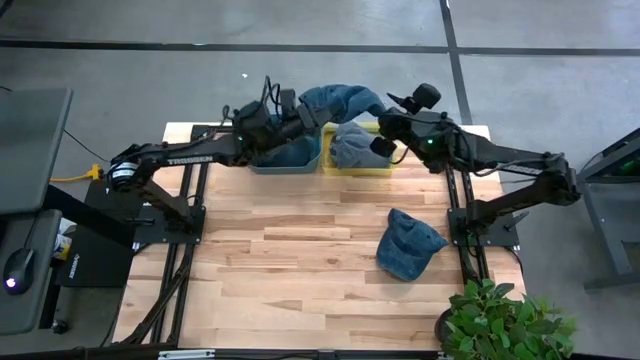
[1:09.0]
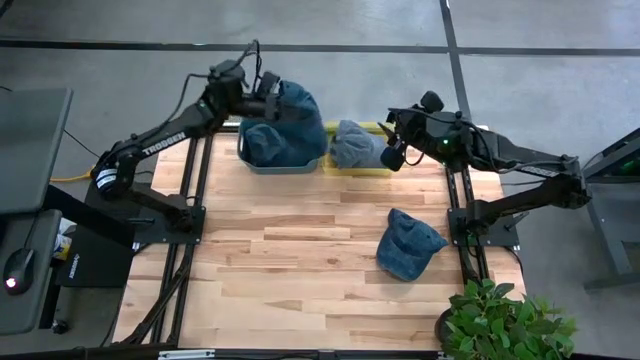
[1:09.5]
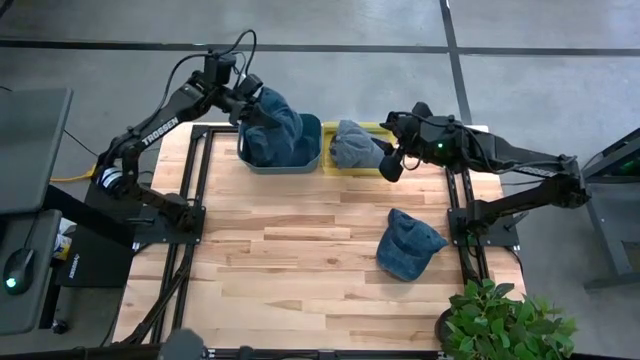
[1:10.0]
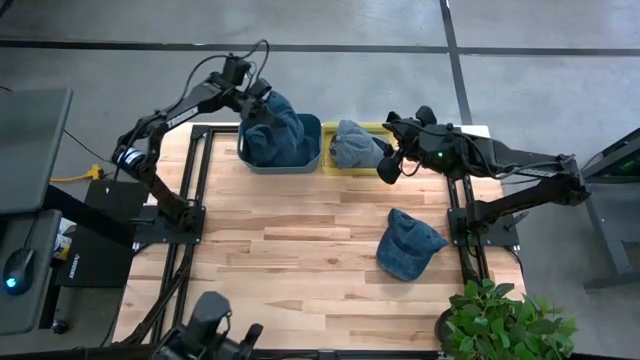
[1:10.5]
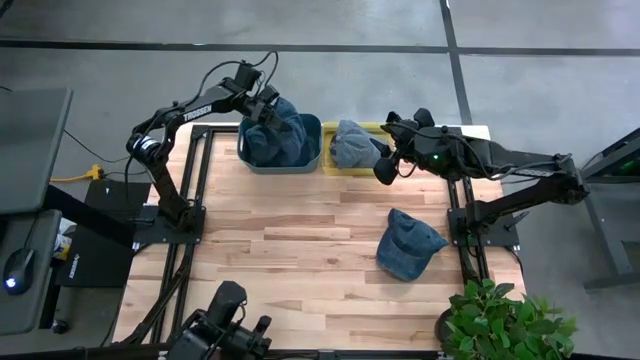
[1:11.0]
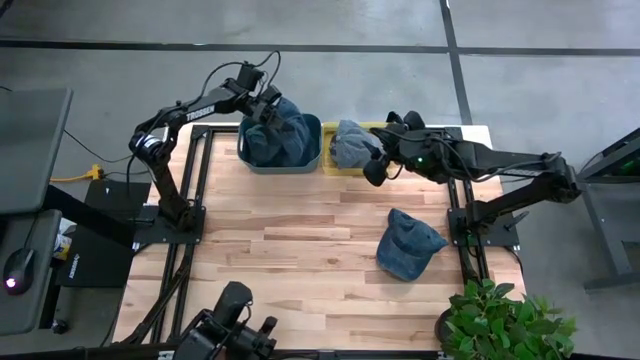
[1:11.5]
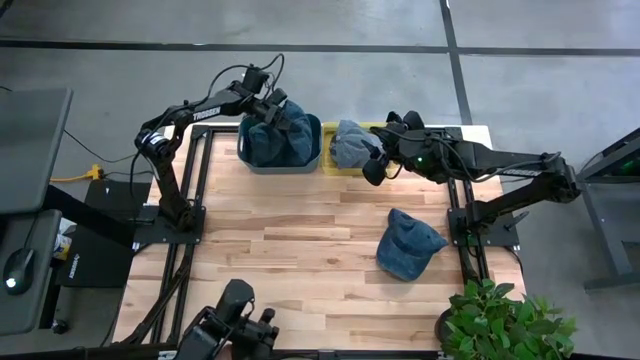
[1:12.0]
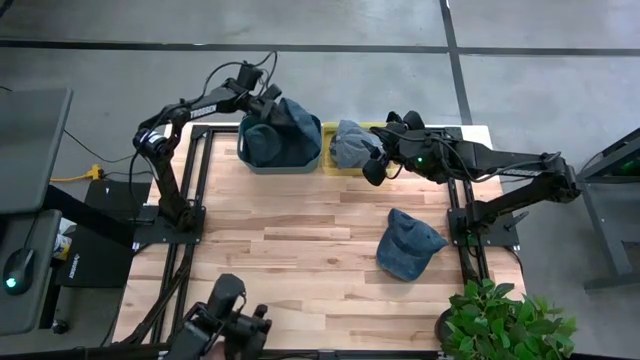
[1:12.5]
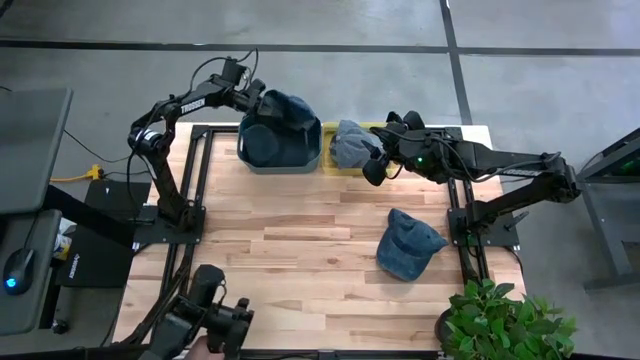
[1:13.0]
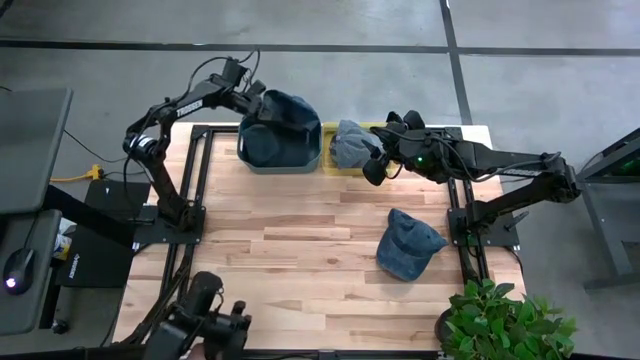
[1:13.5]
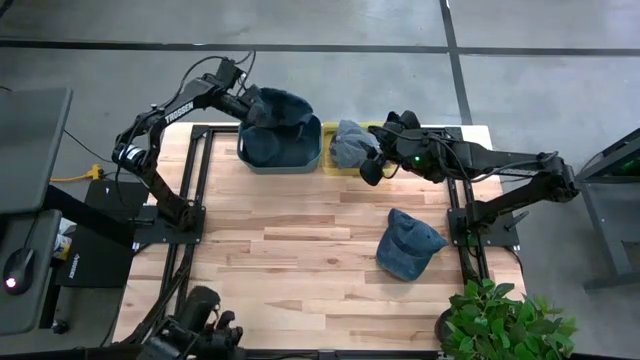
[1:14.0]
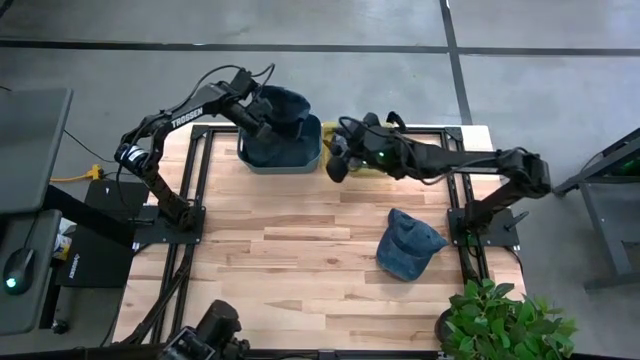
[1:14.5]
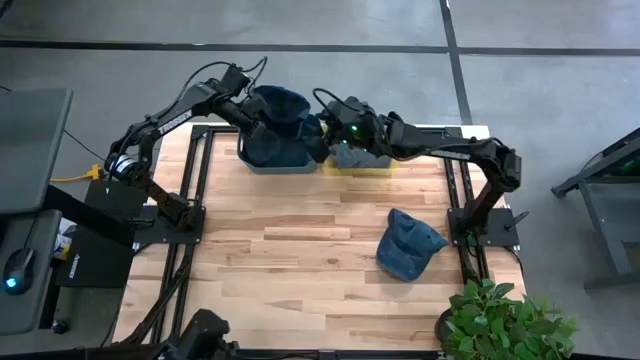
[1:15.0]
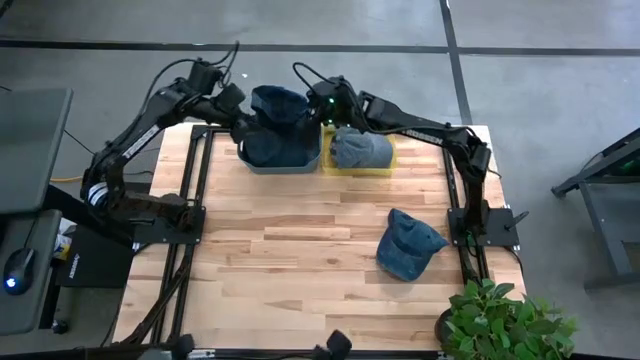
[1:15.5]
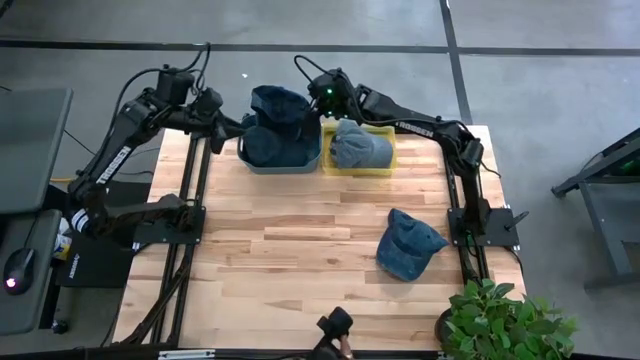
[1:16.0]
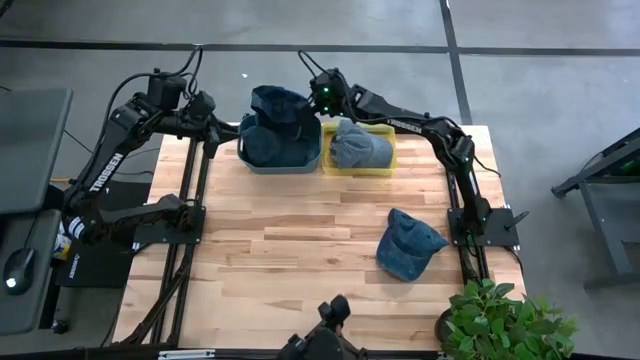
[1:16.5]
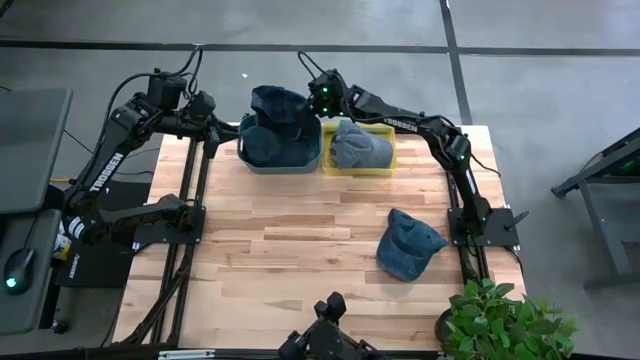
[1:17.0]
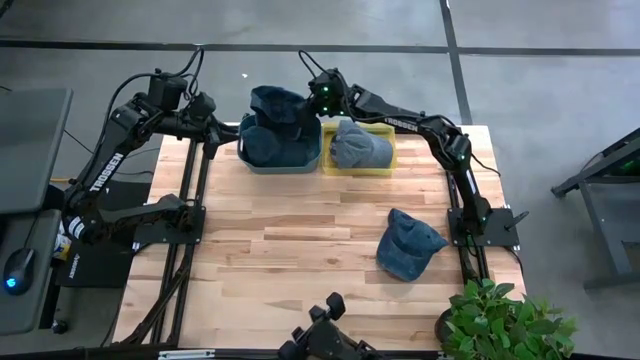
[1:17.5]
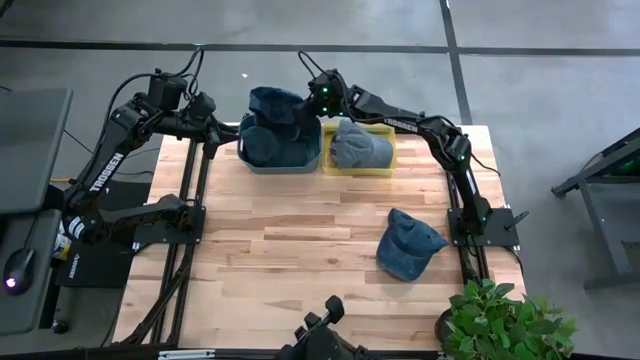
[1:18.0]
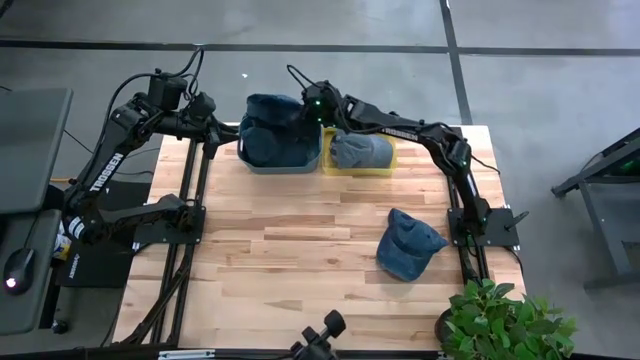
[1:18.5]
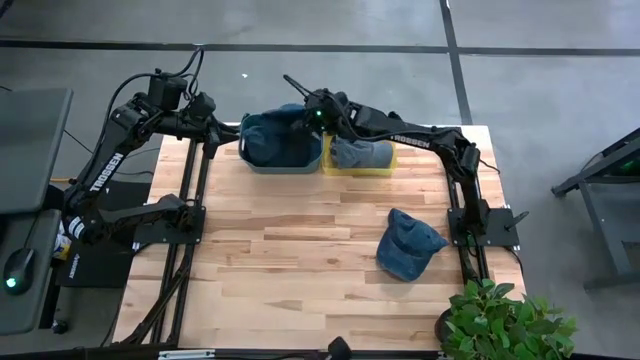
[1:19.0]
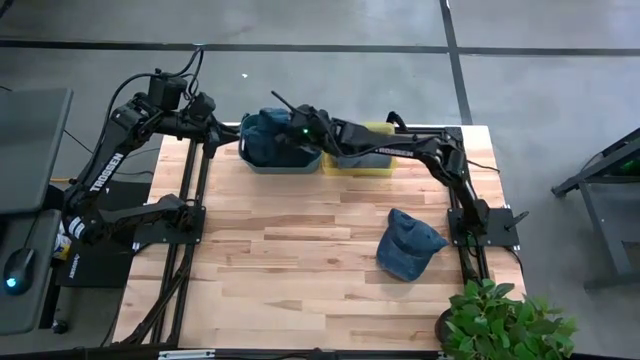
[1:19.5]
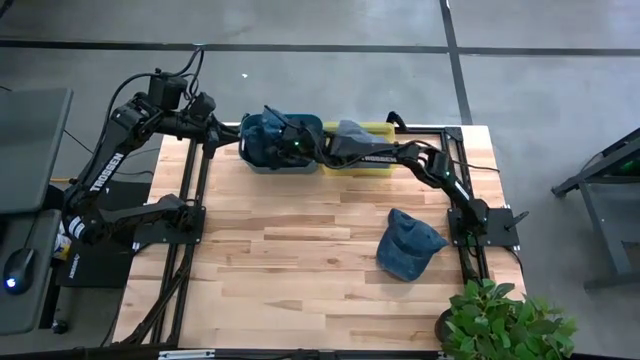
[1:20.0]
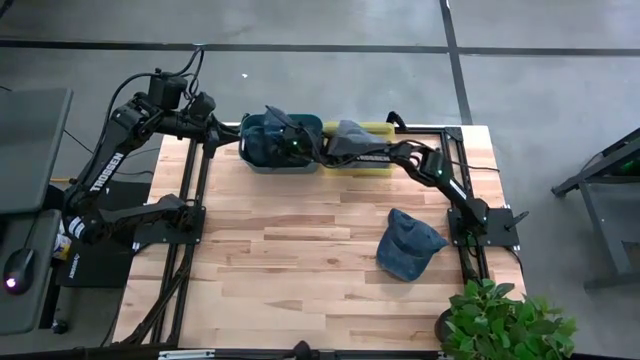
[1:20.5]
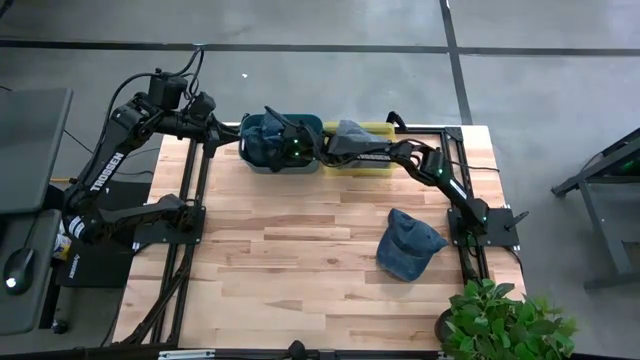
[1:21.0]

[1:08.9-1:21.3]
Task: Pick & Place hat
Put the left blue cap into the blue bin

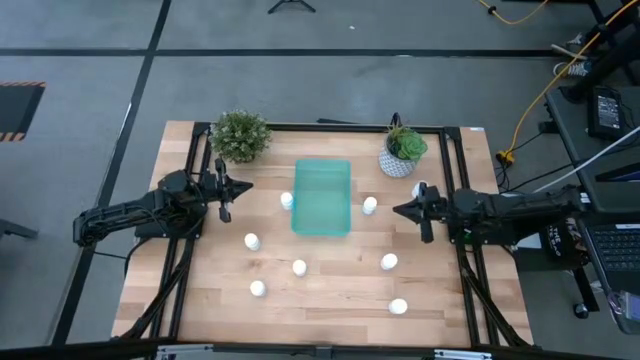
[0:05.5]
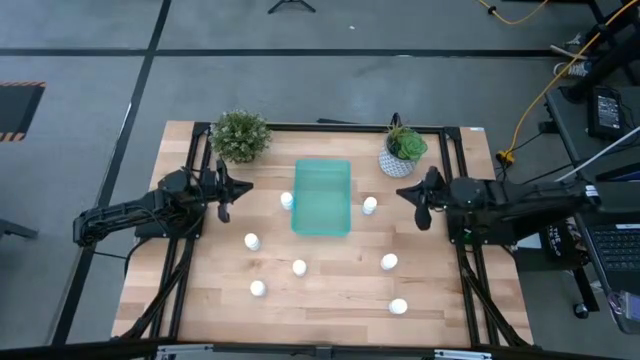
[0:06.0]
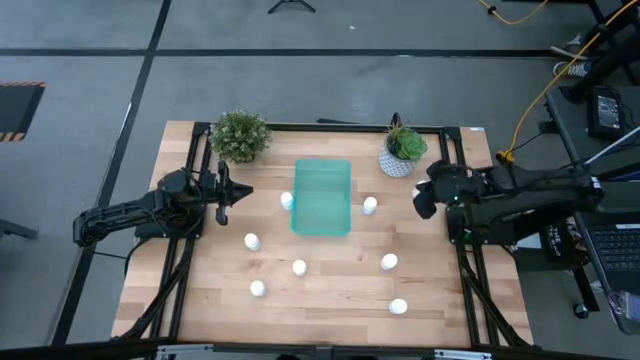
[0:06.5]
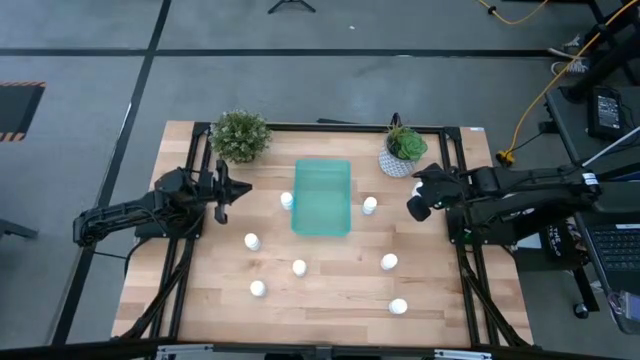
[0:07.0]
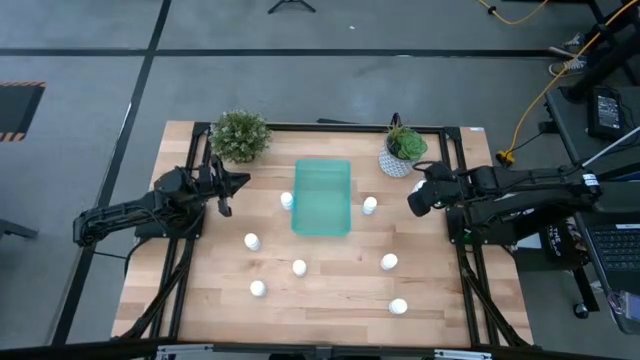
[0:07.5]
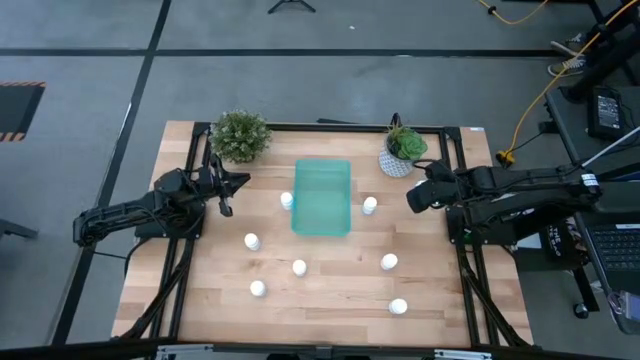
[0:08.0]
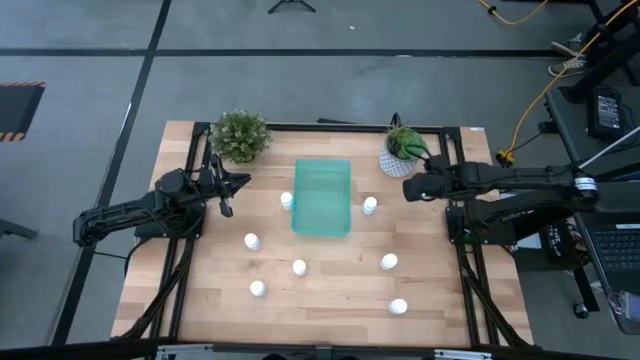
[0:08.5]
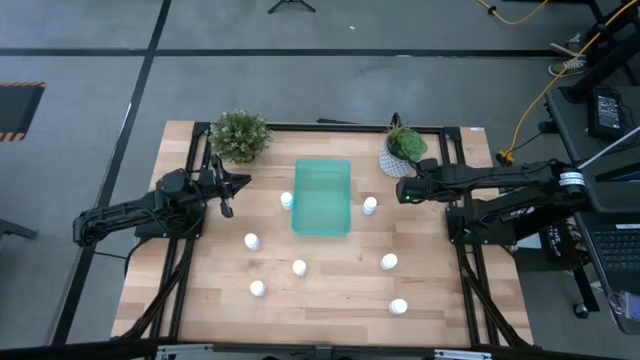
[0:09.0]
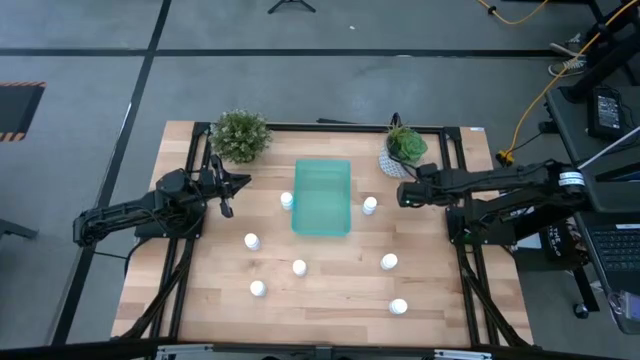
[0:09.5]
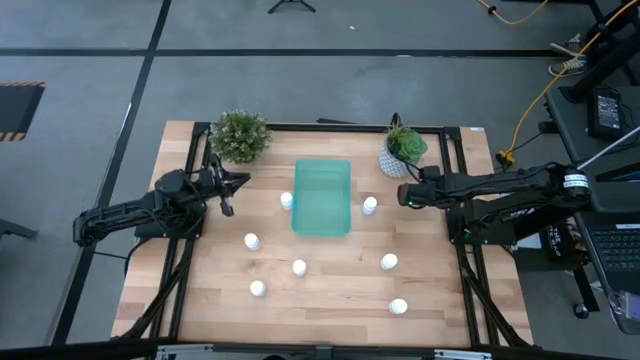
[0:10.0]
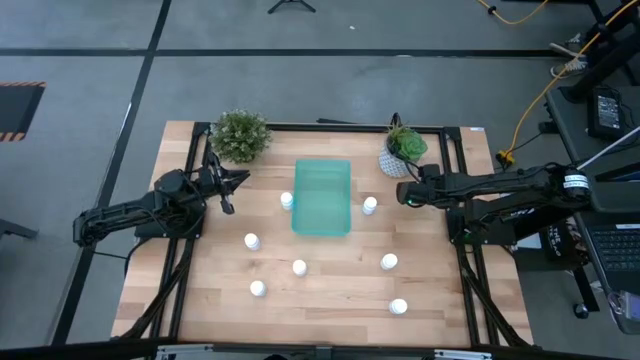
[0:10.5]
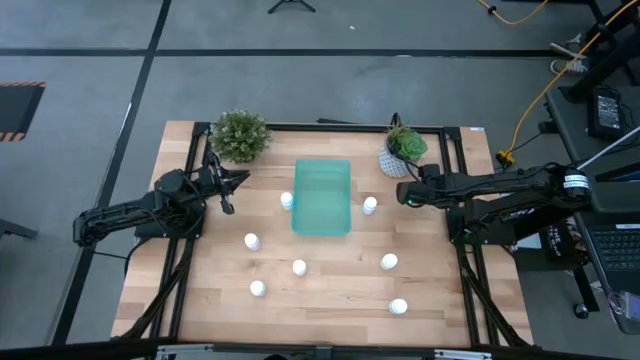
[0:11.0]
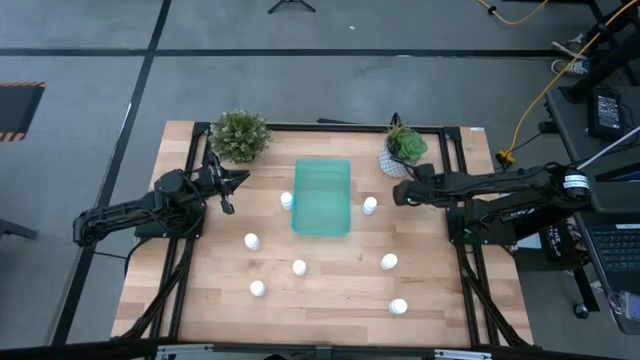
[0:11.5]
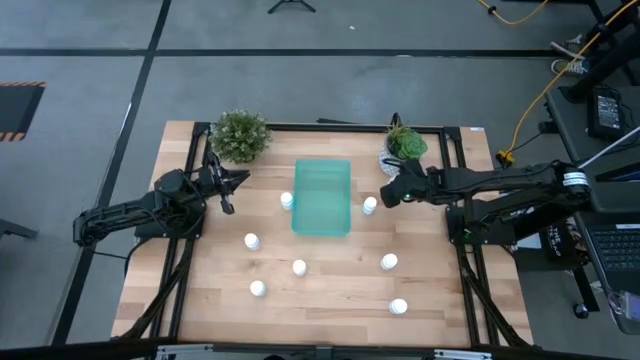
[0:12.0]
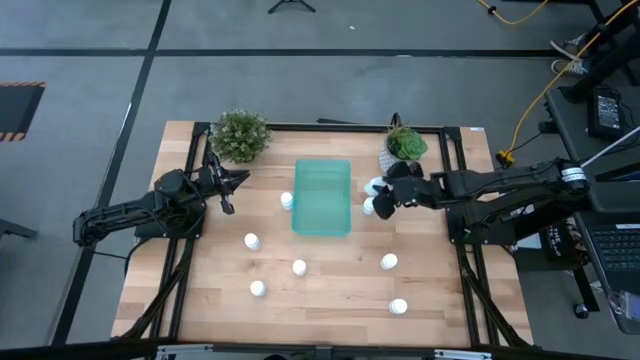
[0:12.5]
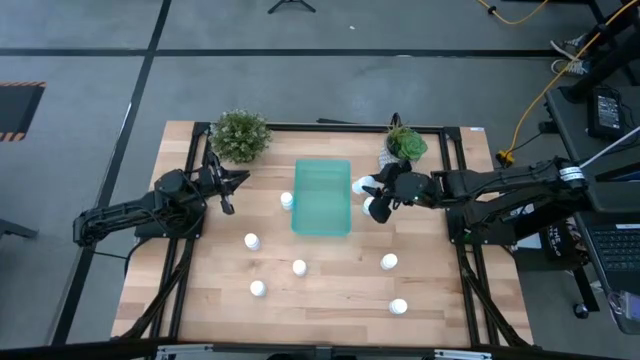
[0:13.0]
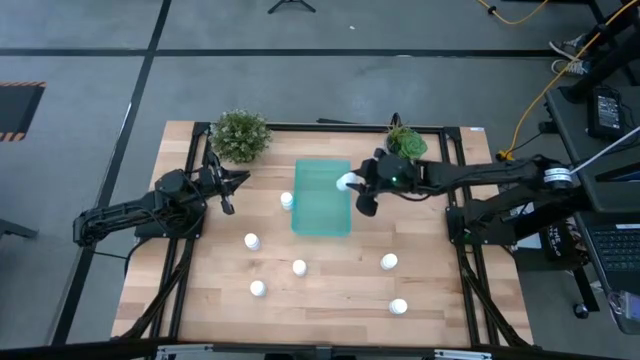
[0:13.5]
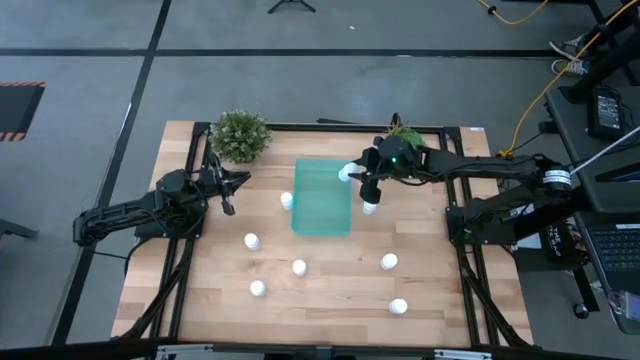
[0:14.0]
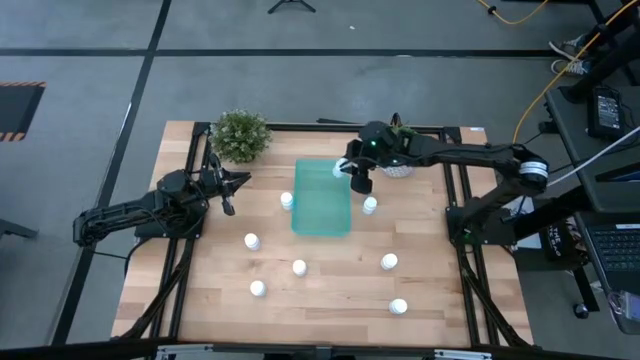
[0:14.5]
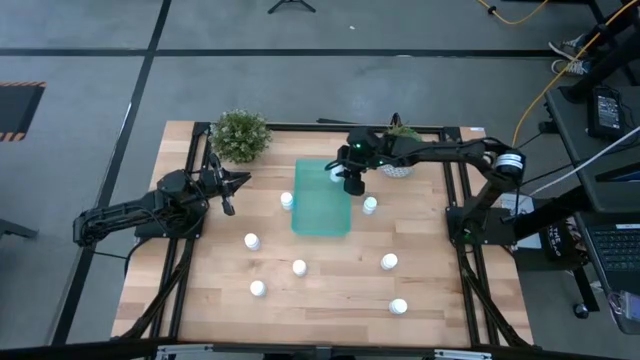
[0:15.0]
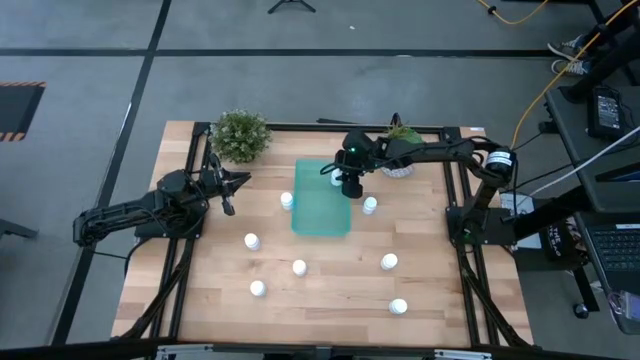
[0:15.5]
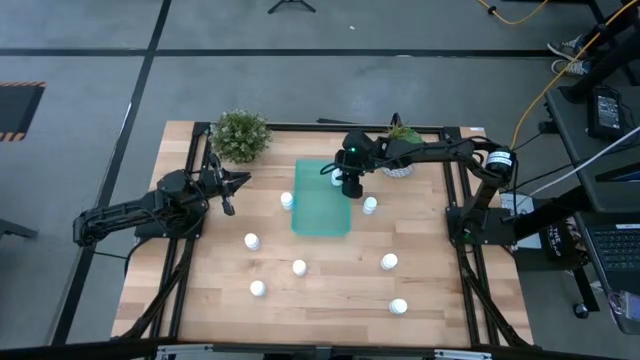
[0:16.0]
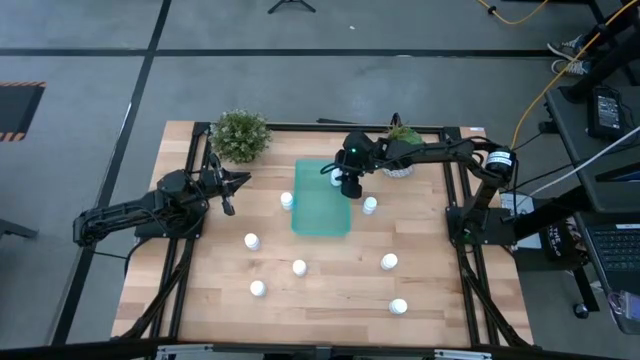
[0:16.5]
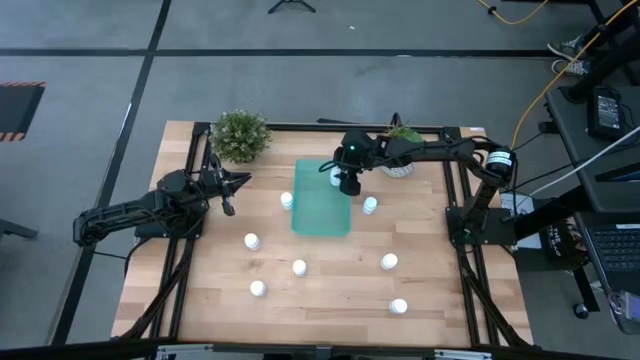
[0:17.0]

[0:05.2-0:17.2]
Task: Pick and place pill bottles into a basket
Put the white pill bottle into the green bin
